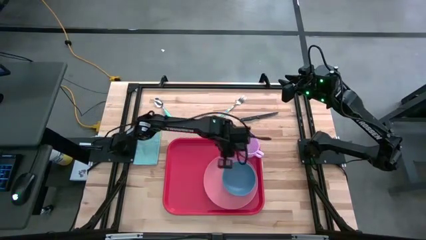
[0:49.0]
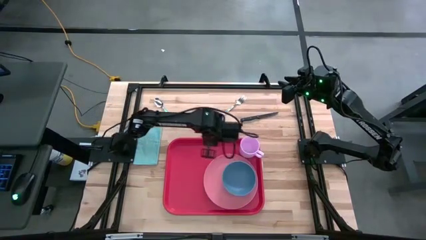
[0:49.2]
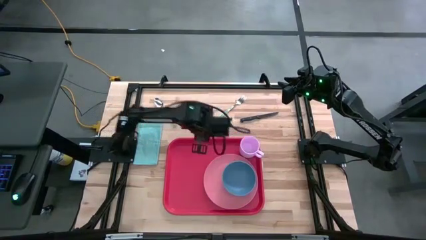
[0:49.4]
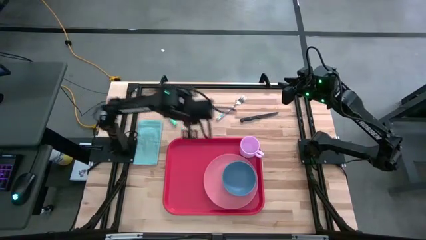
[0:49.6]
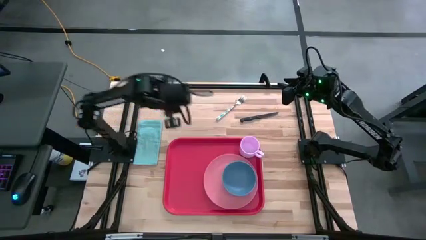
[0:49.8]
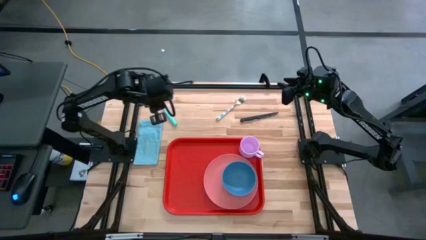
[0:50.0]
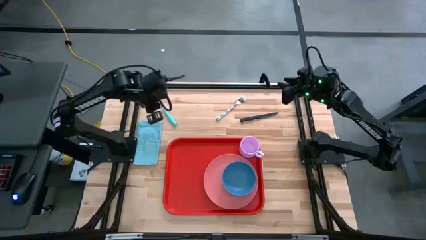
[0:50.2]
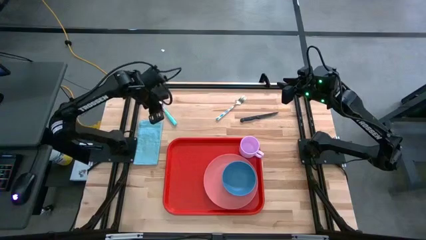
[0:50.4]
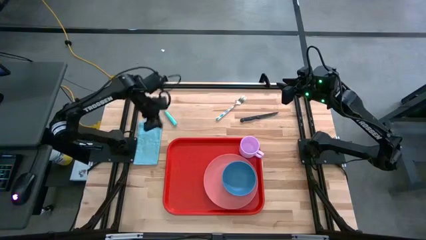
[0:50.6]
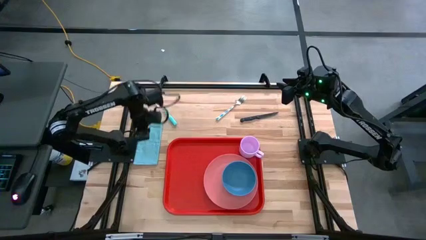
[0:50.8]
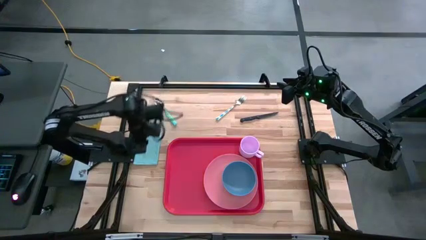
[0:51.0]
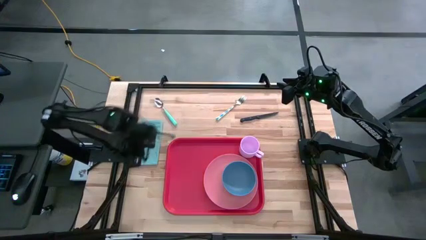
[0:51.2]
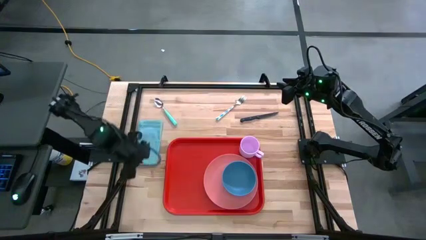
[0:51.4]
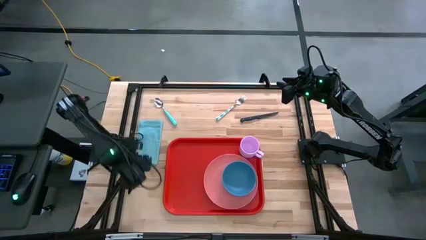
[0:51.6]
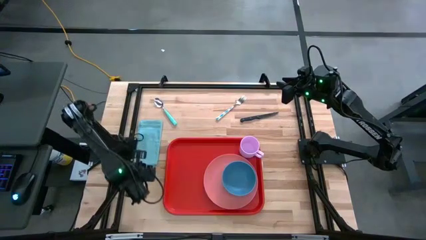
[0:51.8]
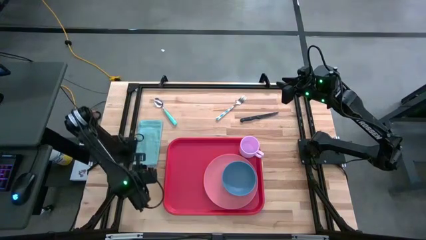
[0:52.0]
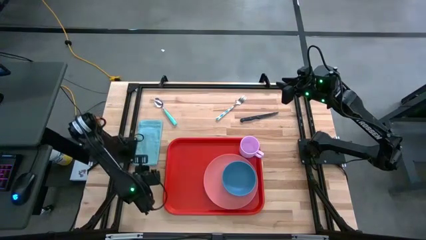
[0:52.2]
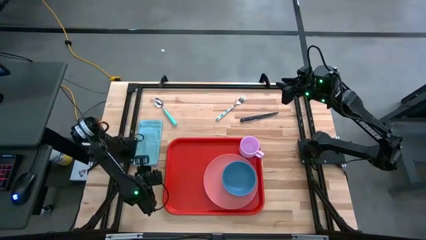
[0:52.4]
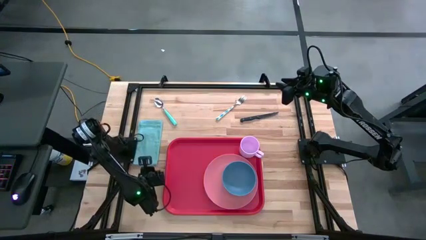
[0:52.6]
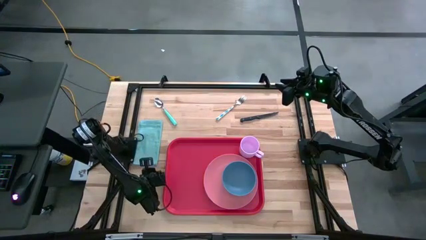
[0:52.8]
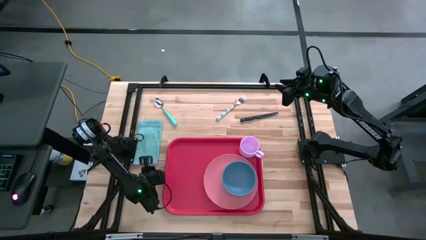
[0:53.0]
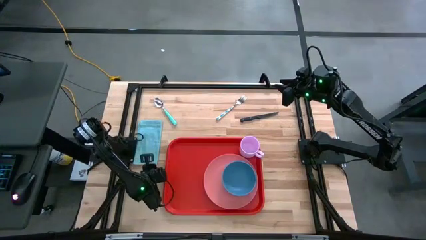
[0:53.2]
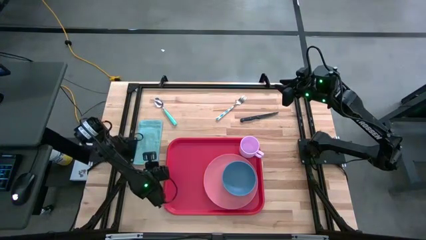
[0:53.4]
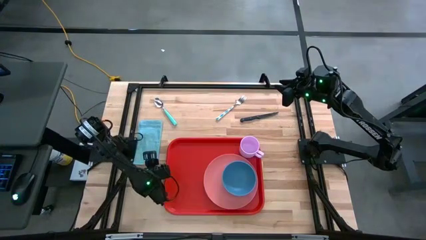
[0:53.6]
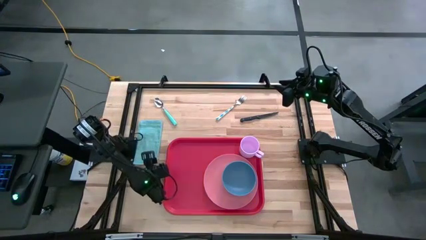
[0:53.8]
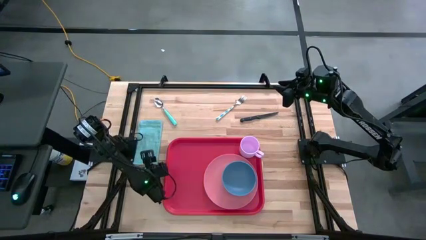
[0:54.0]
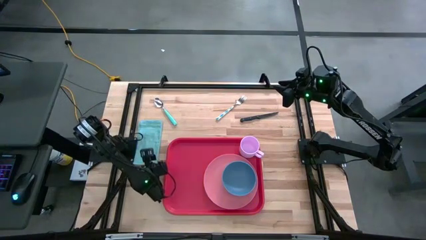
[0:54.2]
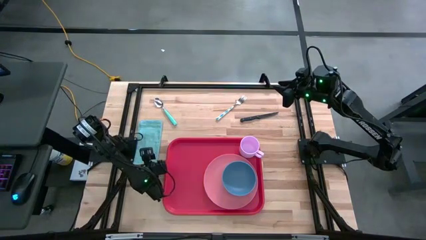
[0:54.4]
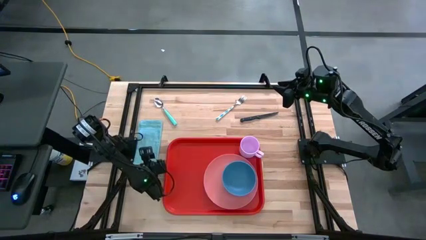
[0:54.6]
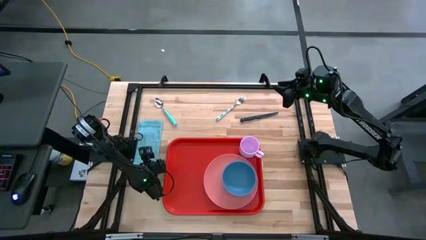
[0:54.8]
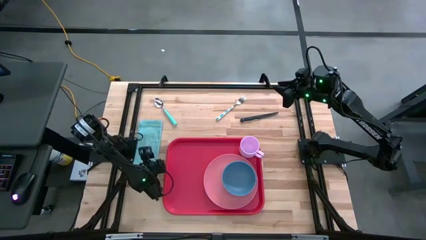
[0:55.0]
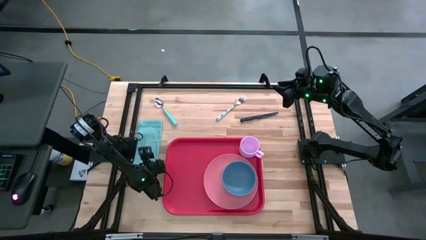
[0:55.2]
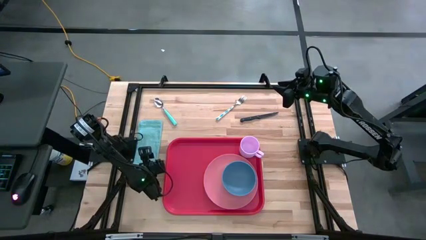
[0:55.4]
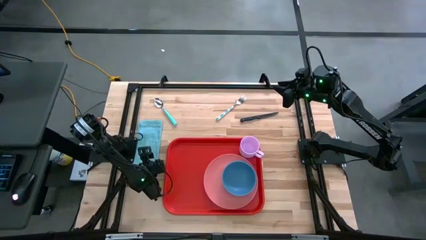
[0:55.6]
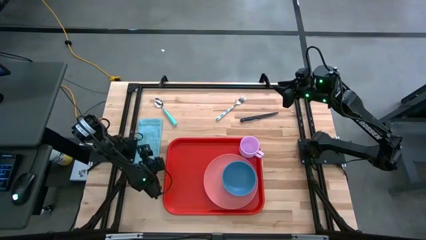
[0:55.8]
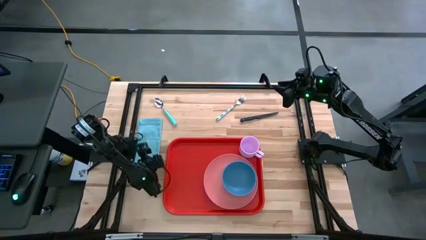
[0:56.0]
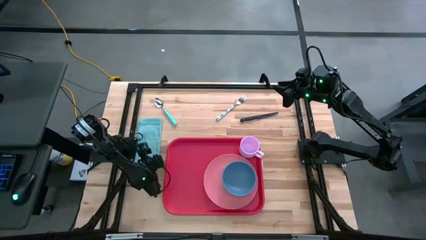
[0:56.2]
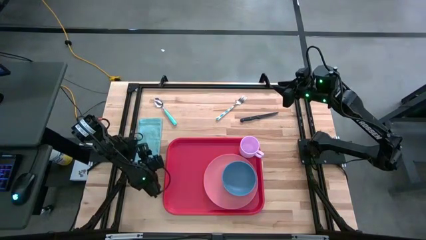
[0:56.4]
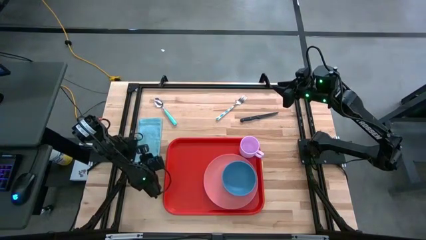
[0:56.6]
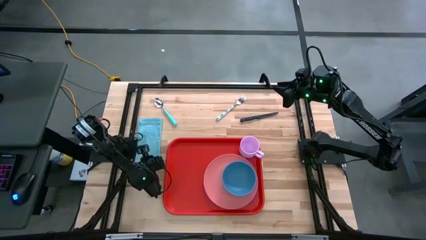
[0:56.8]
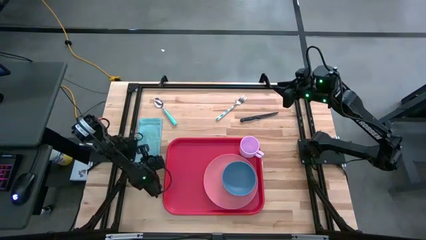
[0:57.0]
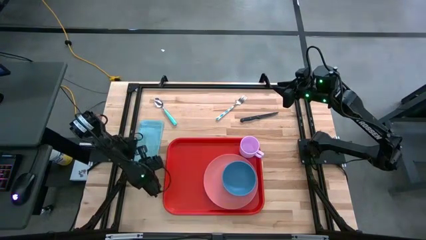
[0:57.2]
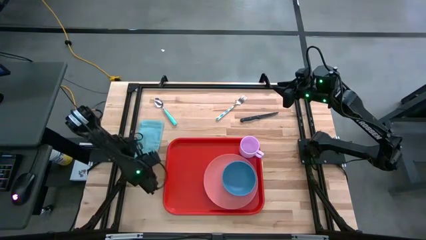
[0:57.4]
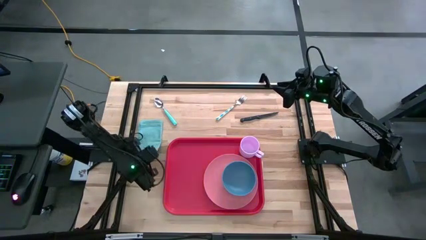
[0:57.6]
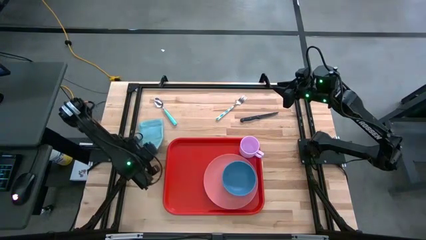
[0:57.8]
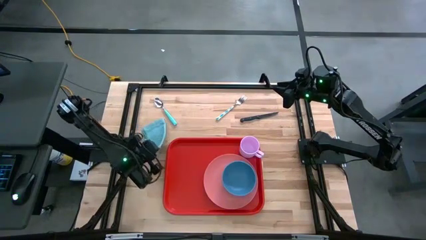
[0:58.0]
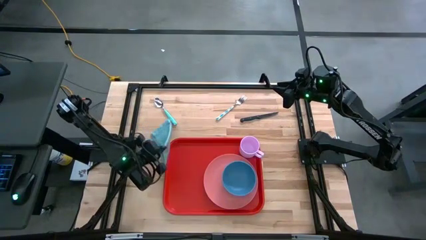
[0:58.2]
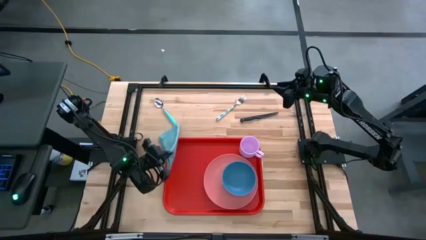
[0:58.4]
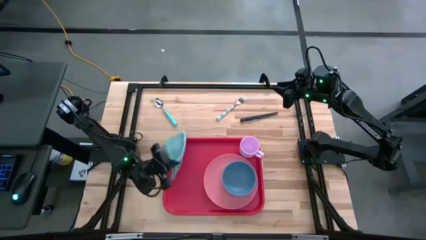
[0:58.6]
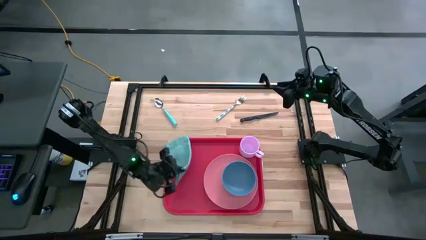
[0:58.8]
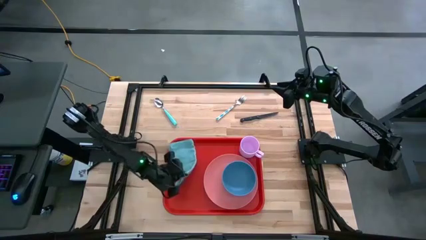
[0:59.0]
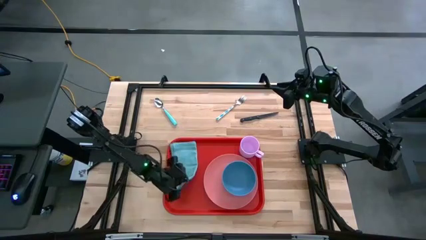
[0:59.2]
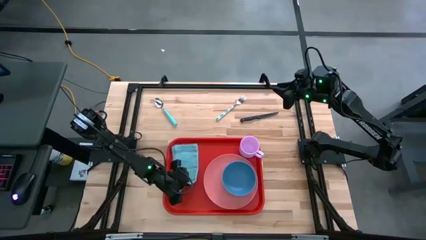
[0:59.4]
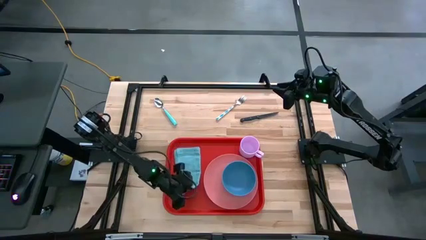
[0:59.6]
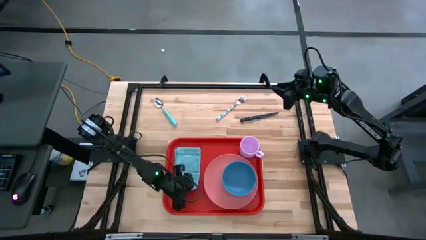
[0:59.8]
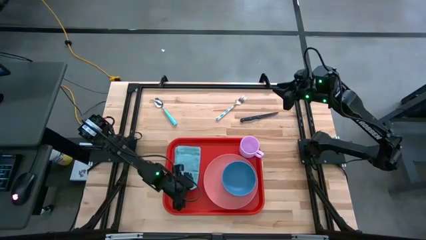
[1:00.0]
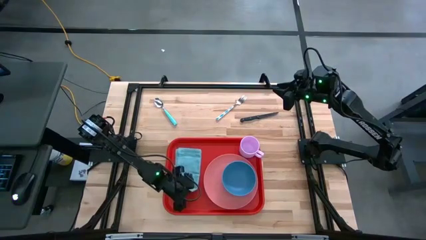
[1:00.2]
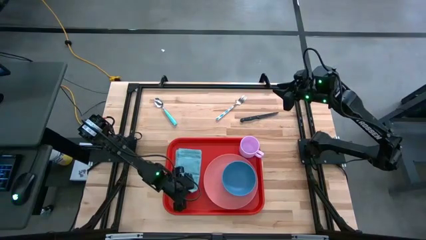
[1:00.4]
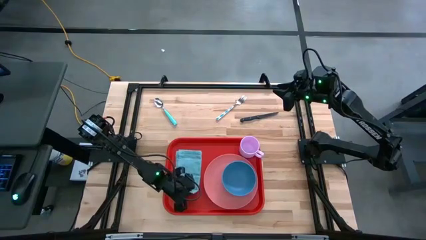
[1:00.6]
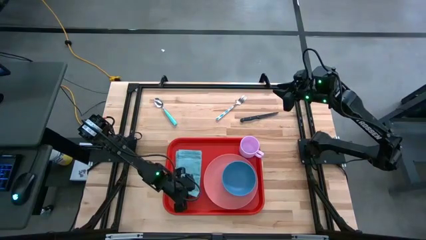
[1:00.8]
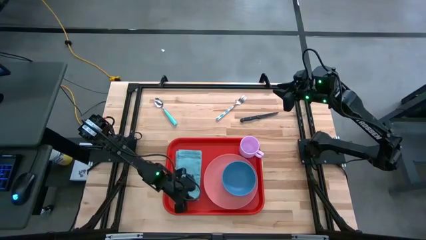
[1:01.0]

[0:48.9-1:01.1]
Task: Set up tray
Put the blue napkin on the red serving tray to the left of the pink plate
